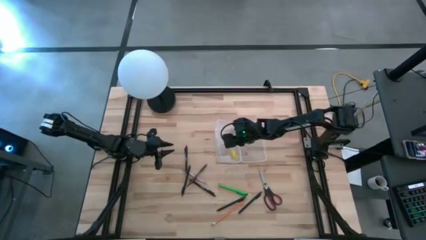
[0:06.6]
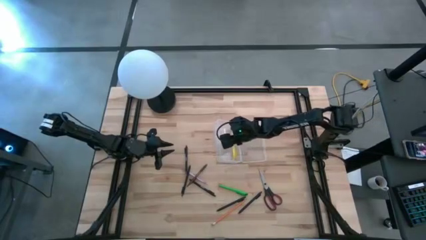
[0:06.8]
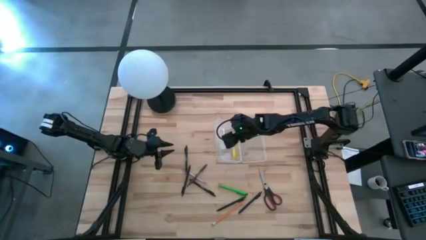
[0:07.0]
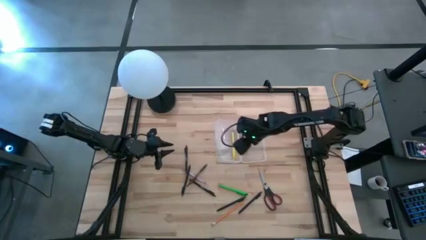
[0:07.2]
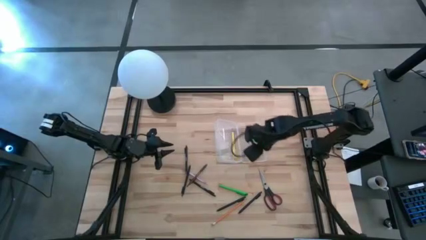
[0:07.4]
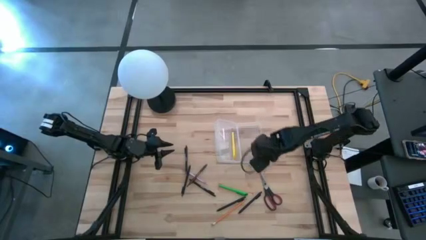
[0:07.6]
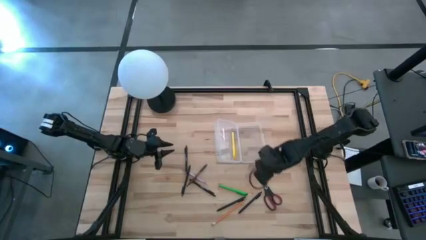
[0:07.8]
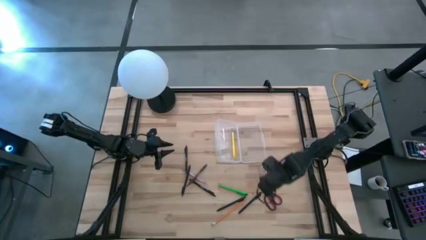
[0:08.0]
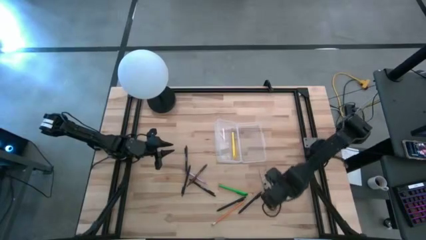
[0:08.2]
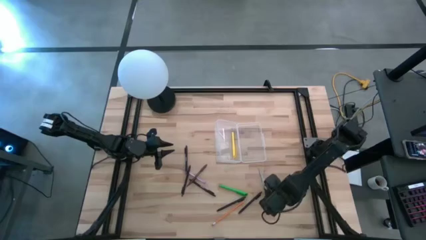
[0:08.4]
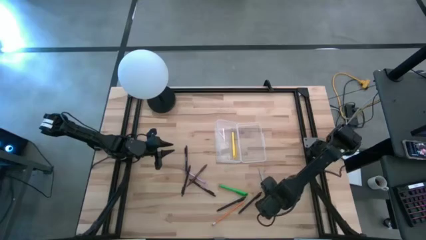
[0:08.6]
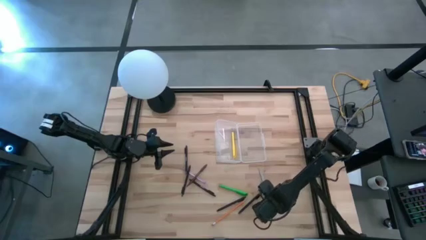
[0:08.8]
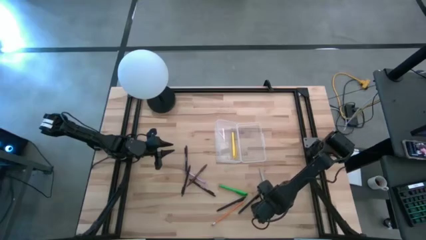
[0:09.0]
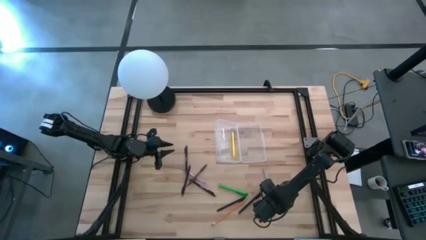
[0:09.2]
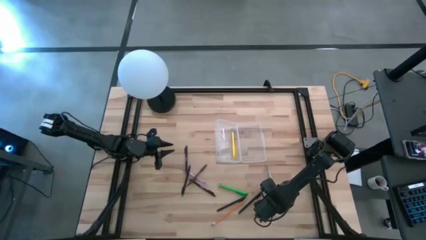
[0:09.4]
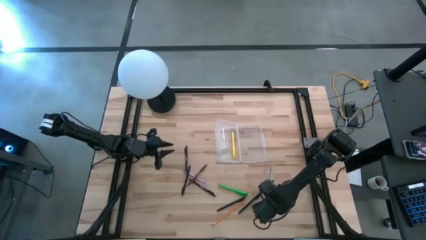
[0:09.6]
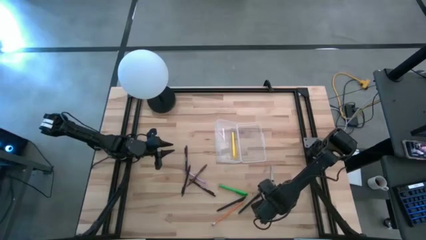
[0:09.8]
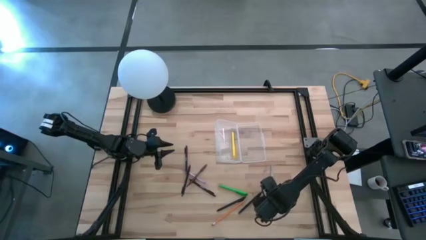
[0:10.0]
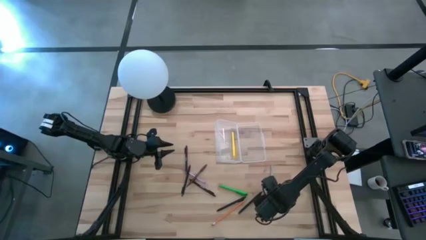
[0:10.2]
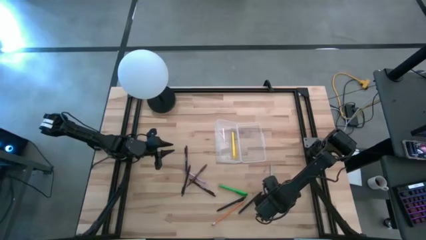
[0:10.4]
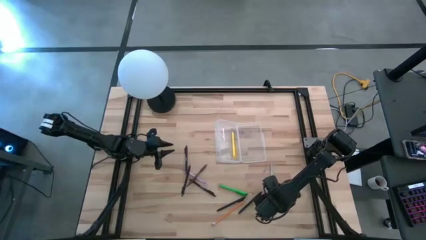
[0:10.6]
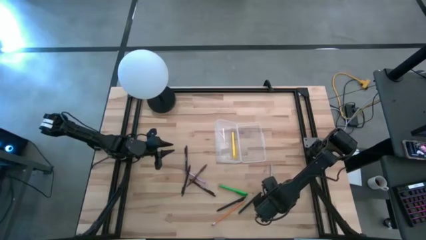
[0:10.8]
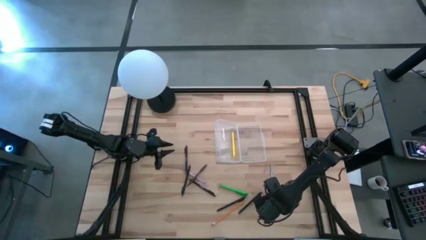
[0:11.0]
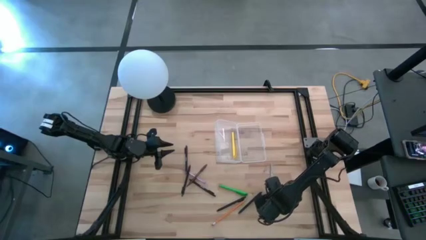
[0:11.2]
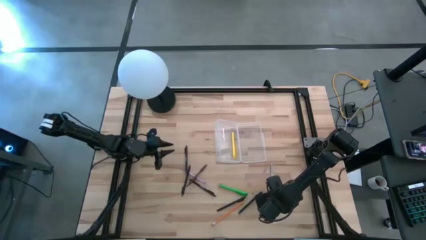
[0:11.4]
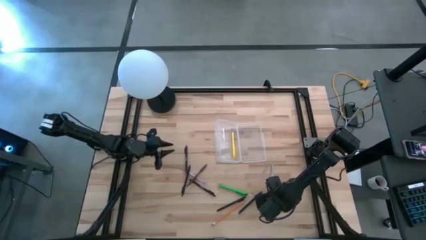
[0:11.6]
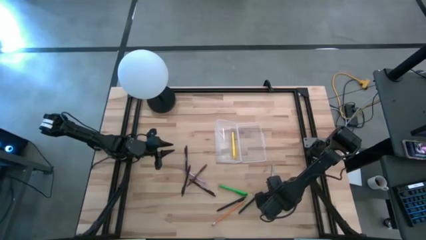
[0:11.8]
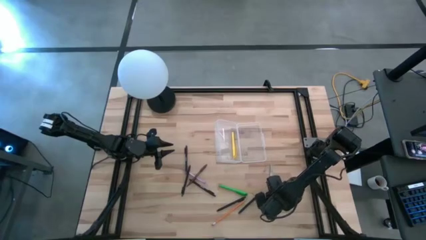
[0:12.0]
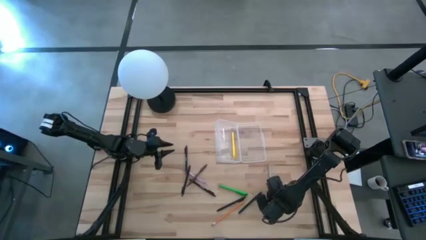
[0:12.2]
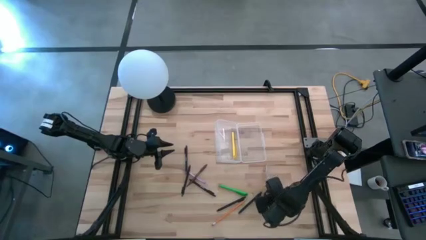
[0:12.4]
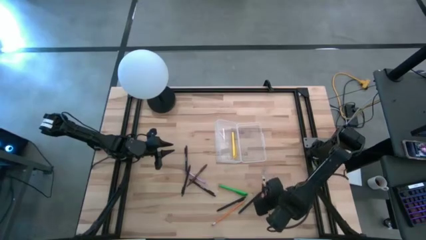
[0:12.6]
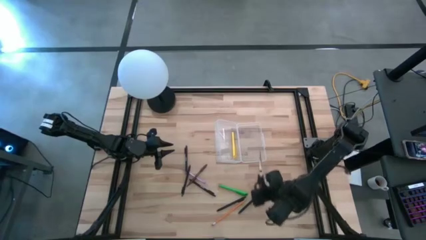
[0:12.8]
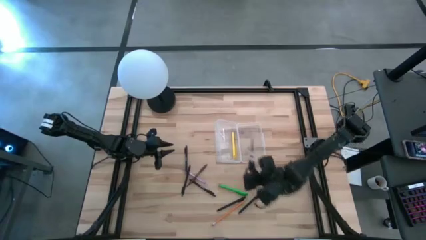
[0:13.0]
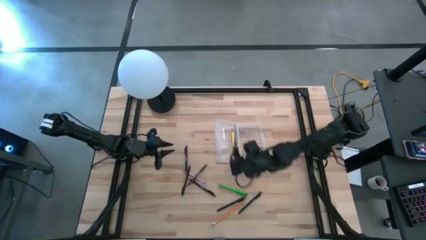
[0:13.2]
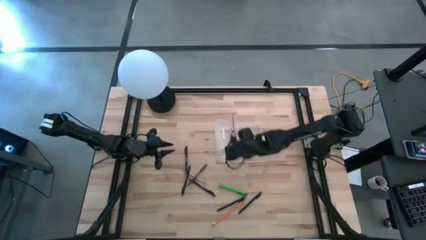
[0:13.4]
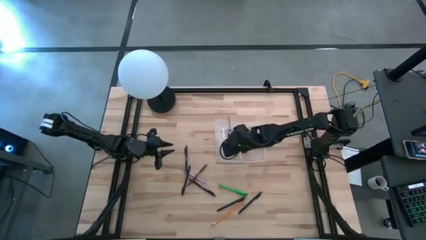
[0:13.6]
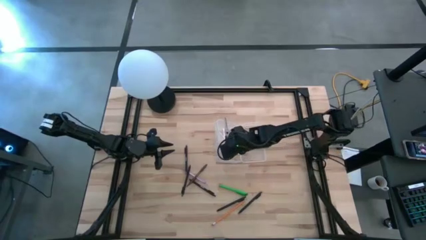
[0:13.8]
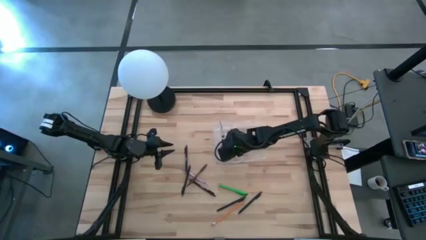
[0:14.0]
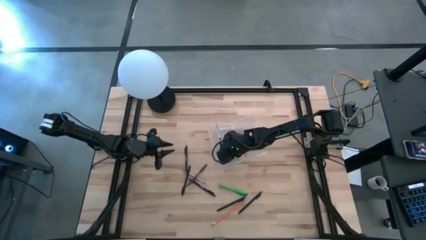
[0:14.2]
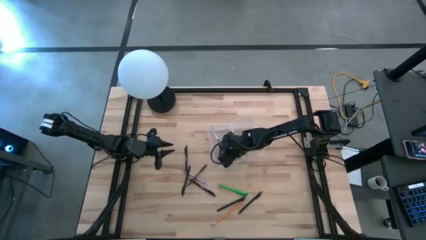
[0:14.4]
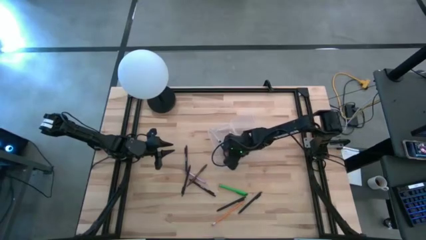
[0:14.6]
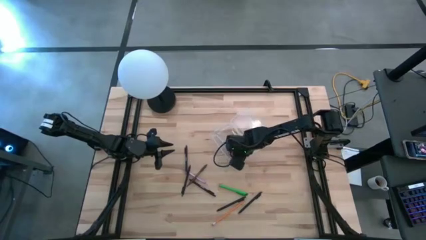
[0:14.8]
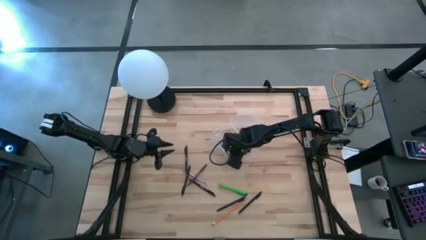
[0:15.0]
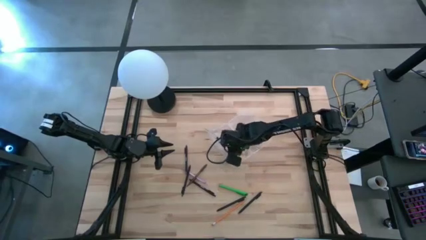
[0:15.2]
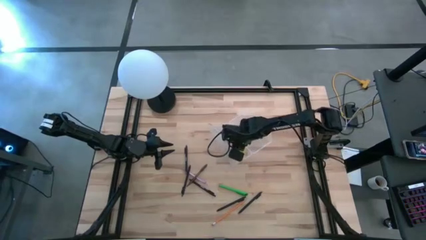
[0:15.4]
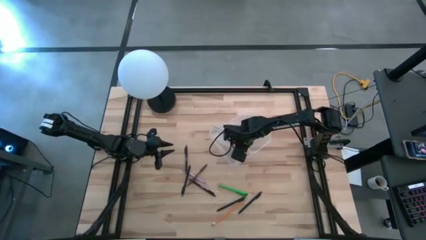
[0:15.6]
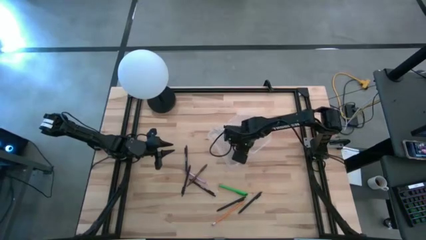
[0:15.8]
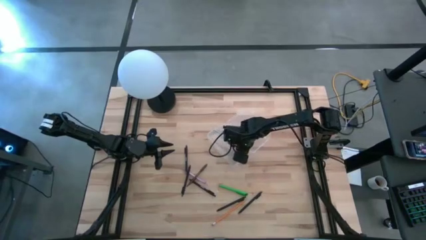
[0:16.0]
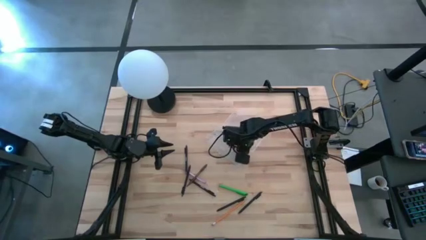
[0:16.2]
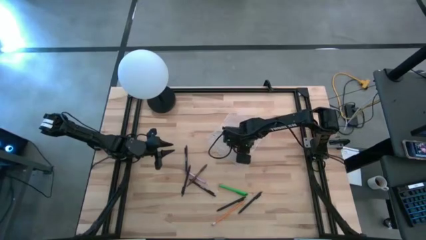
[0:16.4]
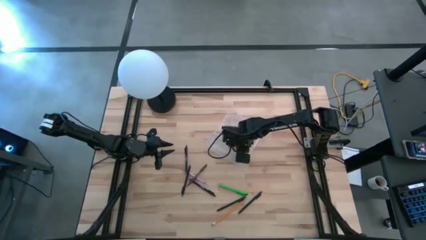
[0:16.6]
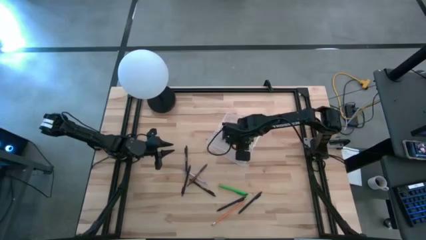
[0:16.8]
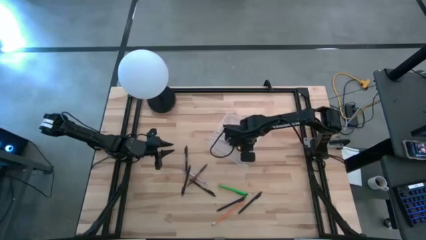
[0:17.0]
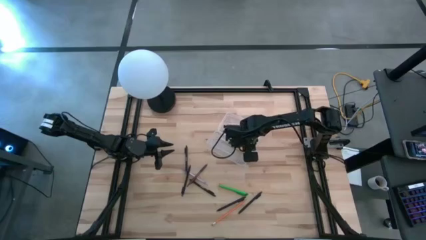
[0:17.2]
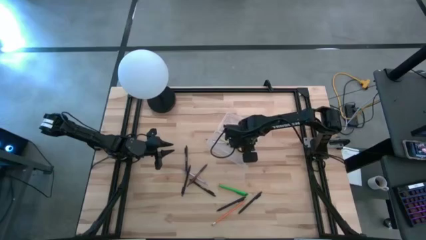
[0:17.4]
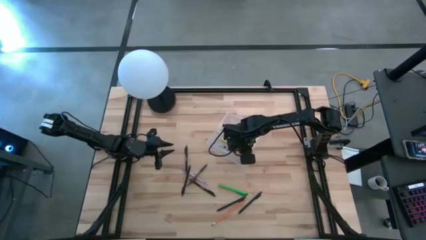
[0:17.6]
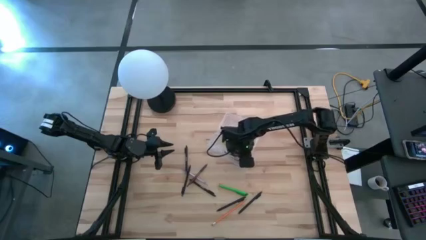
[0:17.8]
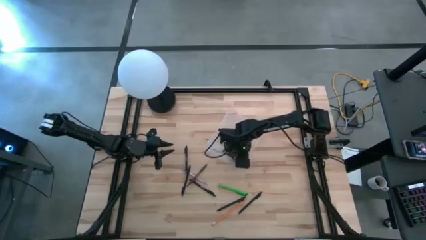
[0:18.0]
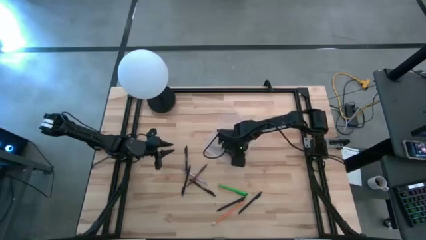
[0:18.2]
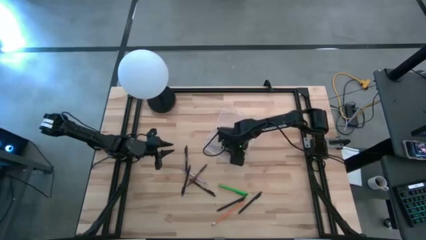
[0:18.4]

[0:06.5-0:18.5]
Task: Pick & place school supplies into a supply box
Put the black scissors into the supply box

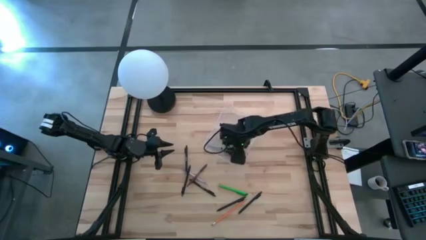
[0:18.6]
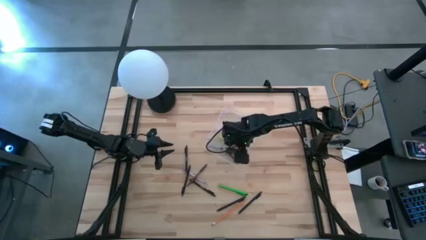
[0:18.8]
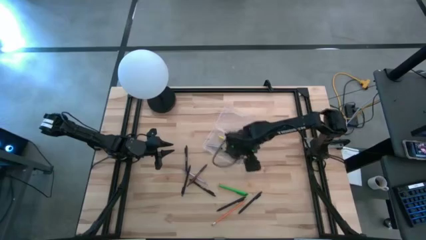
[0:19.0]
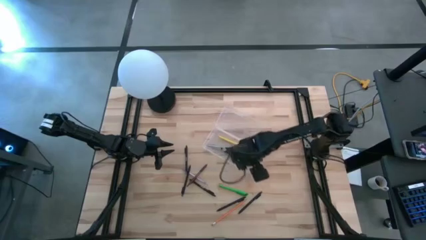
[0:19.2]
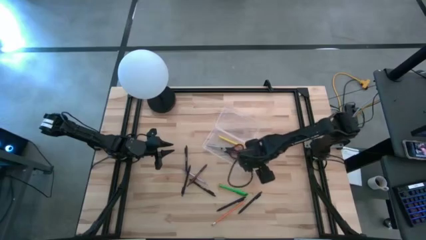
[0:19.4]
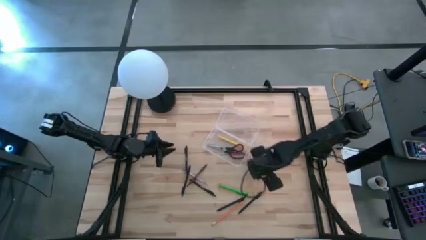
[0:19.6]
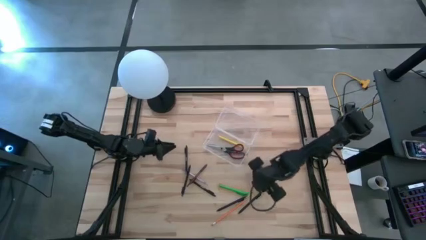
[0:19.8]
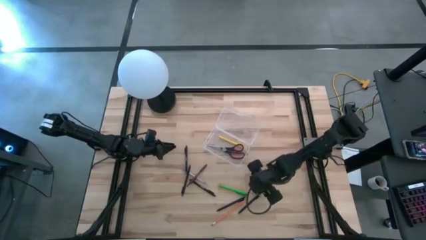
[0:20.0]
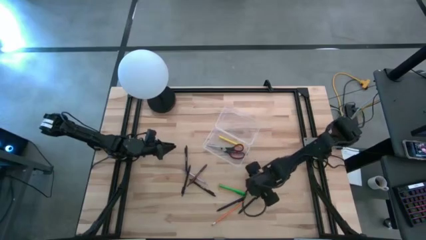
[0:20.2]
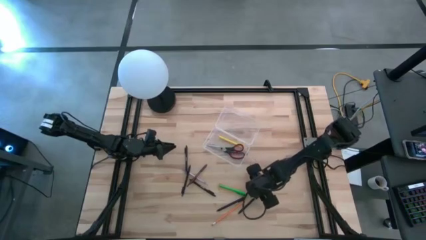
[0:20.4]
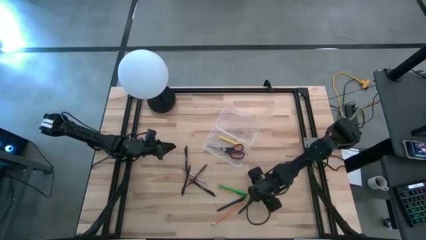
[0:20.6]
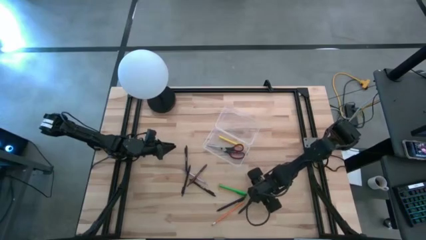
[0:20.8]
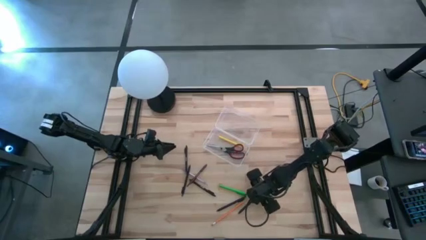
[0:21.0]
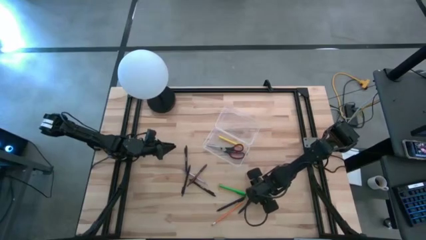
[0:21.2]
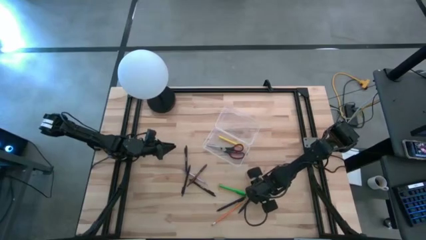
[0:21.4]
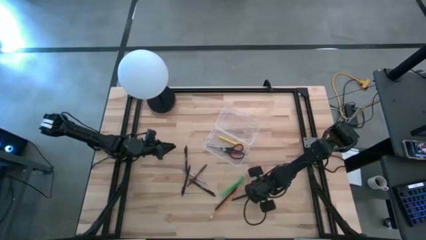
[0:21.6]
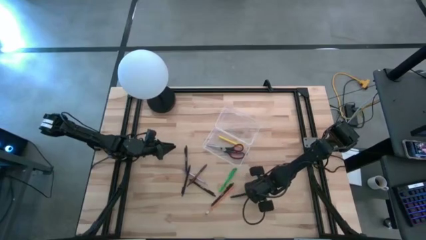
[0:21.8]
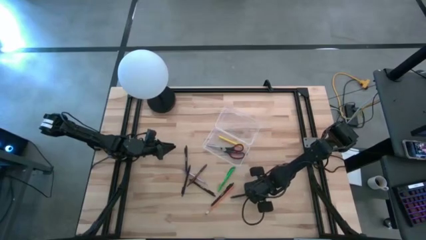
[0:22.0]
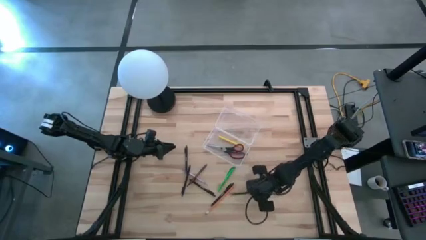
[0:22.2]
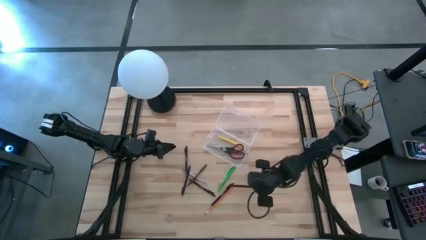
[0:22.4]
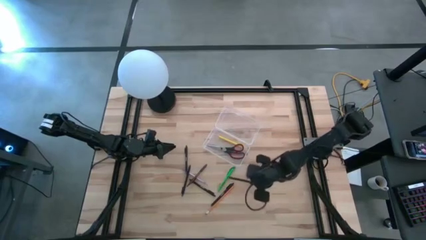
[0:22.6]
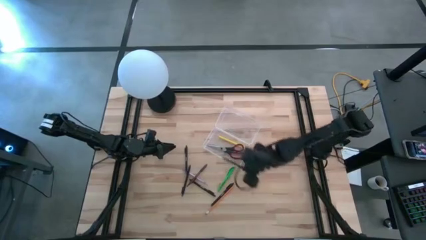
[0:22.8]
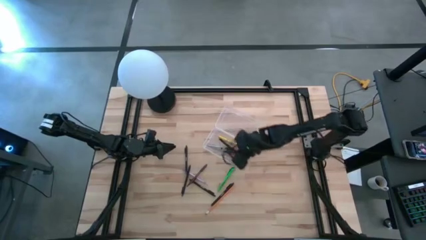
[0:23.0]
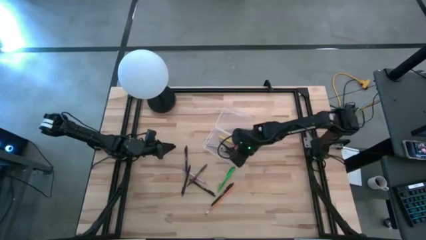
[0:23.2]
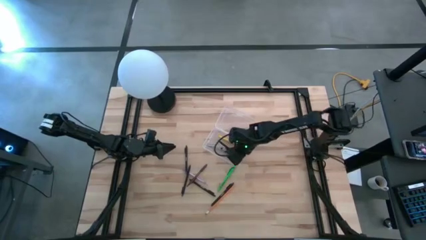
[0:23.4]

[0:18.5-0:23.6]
Put the black pen into the supply box
